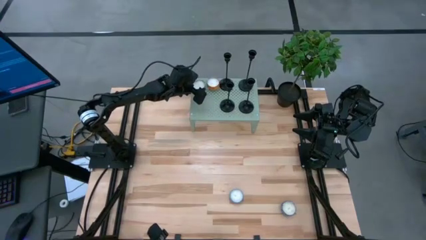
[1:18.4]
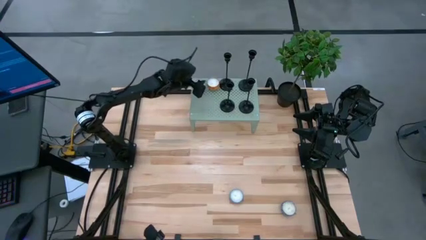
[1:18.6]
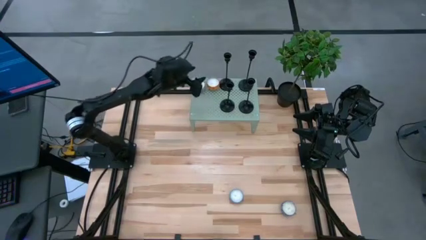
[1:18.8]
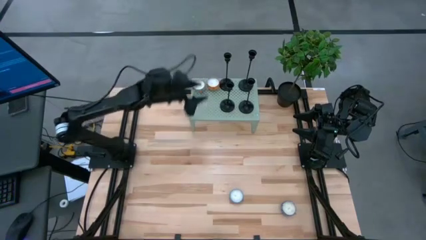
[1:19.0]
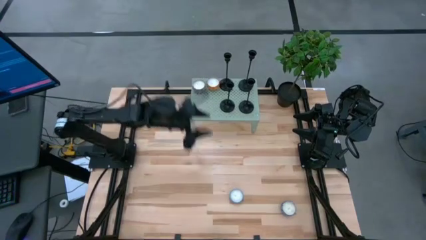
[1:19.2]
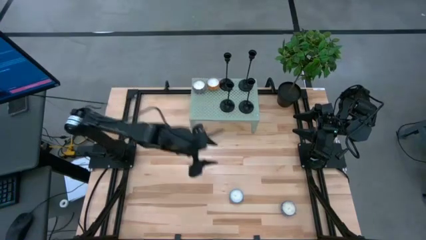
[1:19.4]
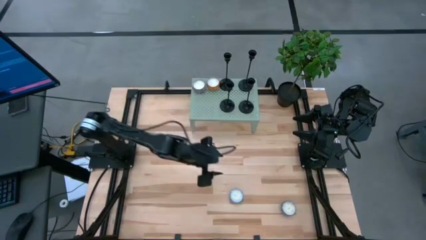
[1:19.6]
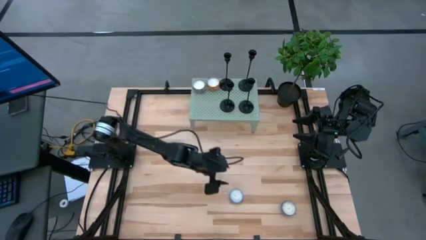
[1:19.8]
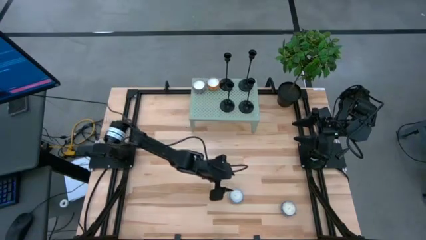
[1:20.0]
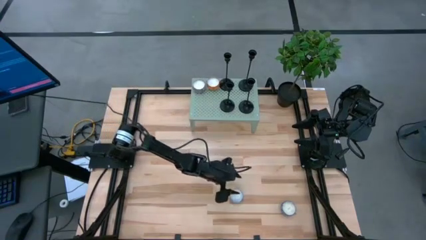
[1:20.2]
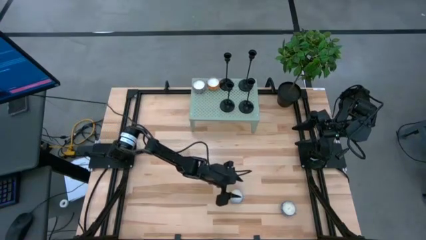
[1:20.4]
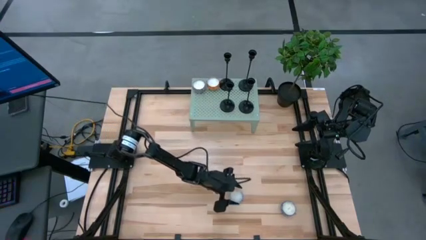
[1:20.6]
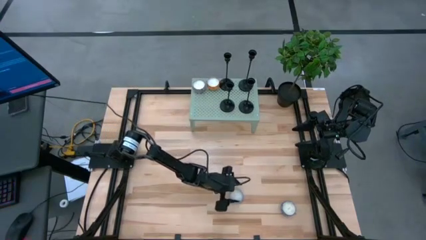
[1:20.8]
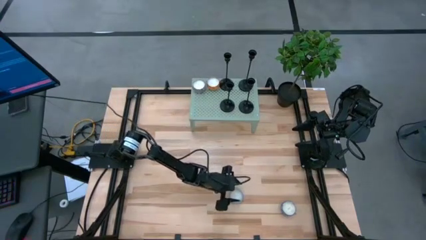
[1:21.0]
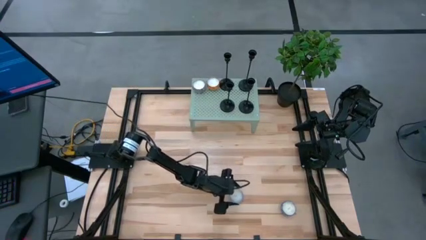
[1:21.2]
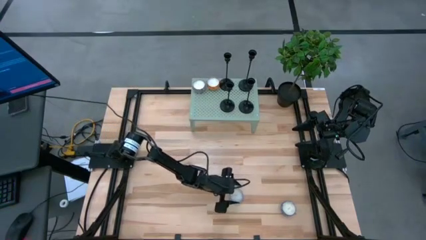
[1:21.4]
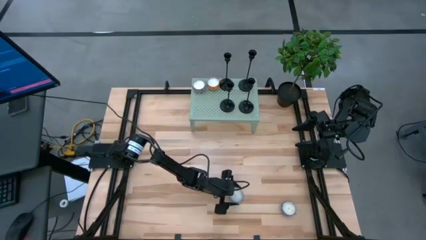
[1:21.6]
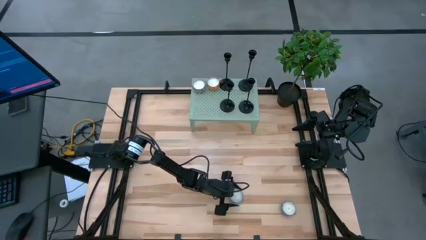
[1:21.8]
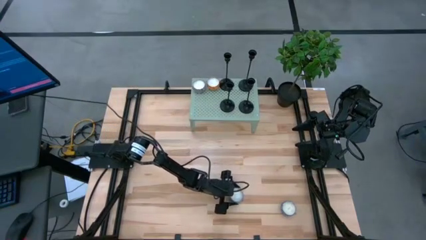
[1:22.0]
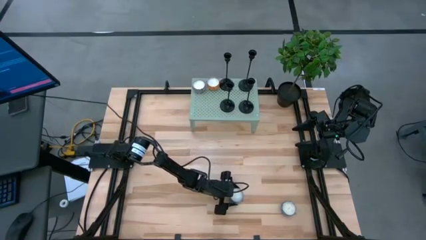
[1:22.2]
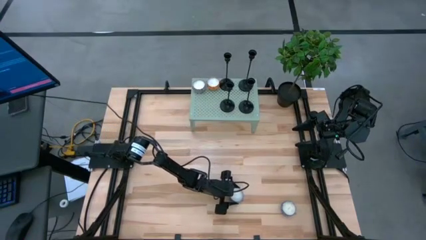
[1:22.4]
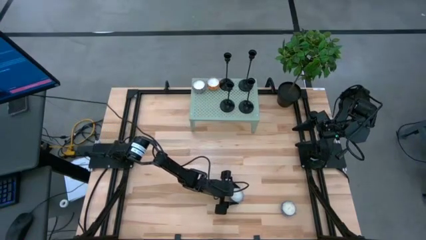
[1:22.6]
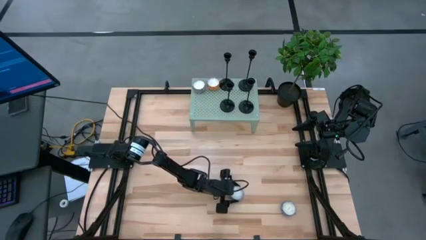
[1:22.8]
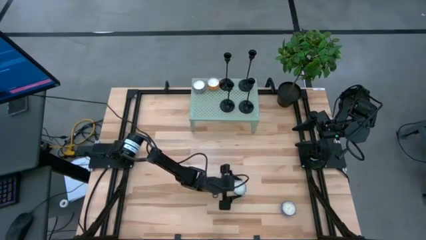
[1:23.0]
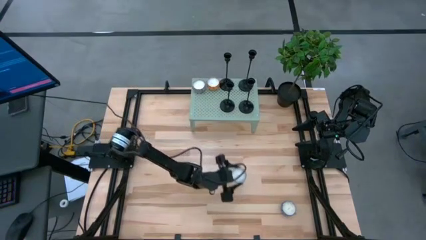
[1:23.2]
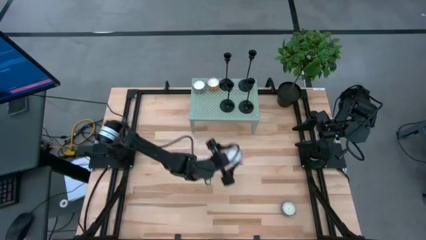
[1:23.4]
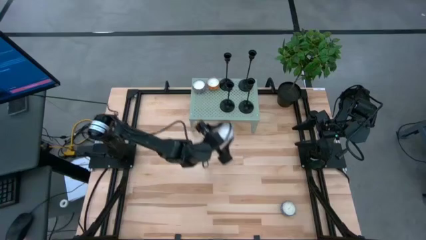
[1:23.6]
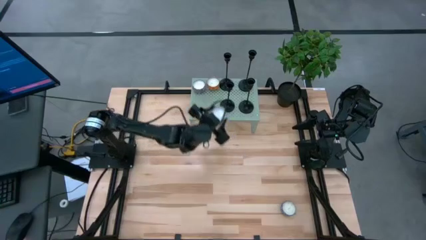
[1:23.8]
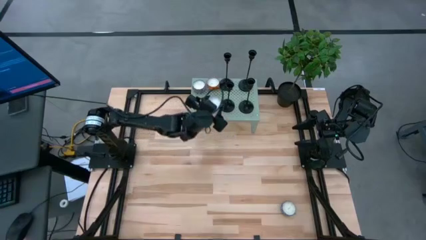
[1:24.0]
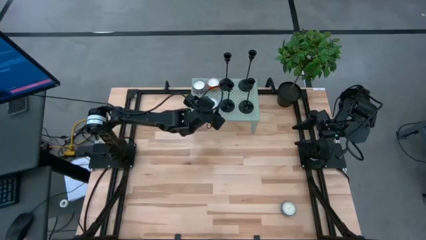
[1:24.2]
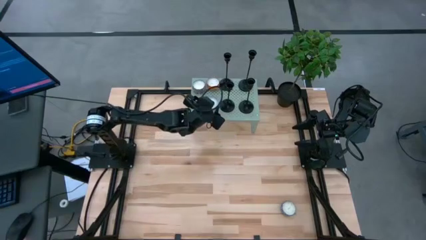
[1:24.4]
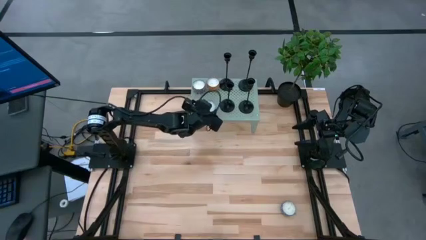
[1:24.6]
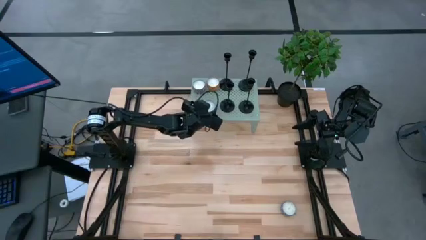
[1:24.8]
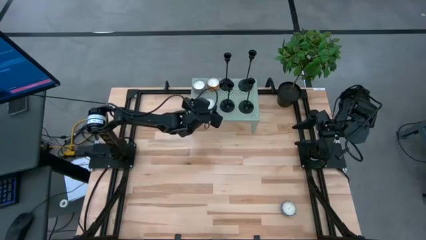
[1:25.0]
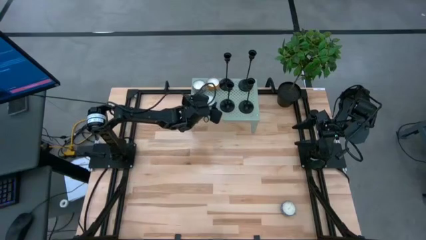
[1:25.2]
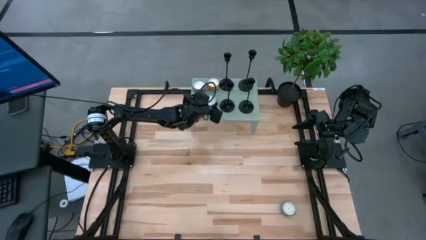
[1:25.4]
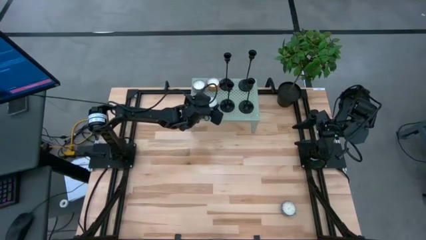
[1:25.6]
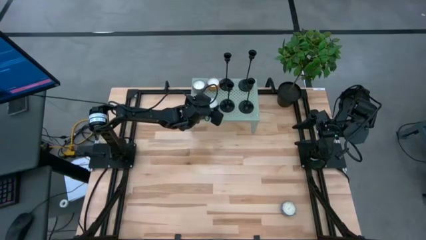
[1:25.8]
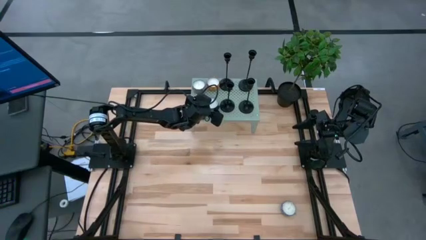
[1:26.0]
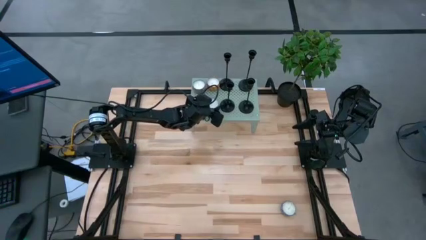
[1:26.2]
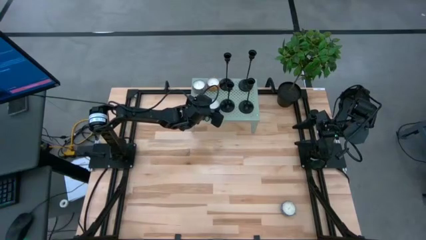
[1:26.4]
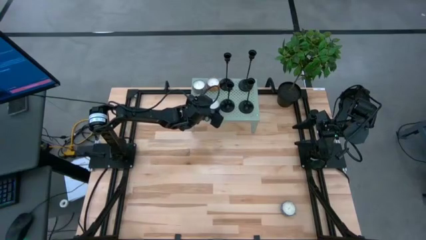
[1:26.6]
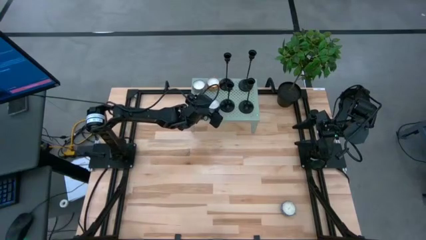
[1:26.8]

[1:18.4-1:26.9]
Task: Pick & Place candle stick holders
Put the light blue scented candle on the shelf

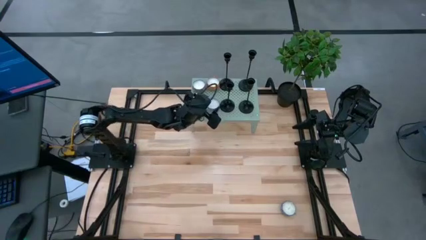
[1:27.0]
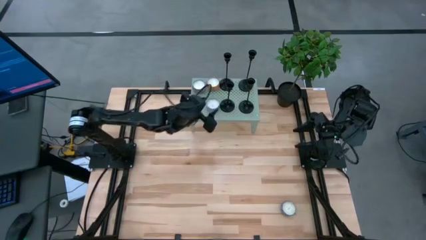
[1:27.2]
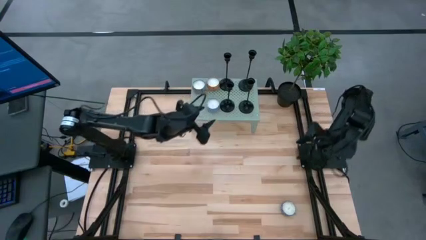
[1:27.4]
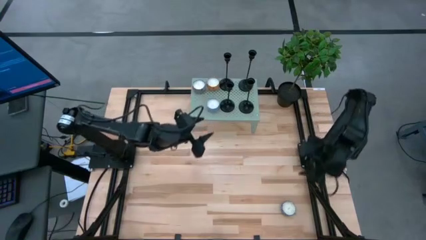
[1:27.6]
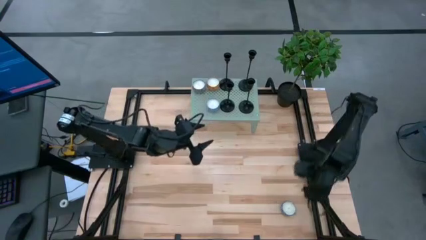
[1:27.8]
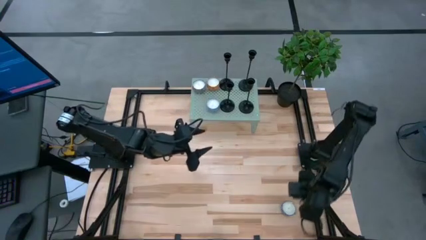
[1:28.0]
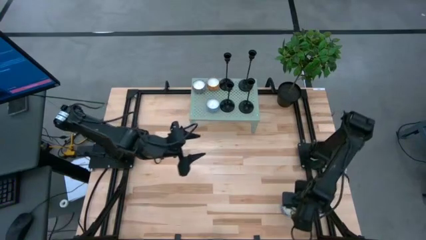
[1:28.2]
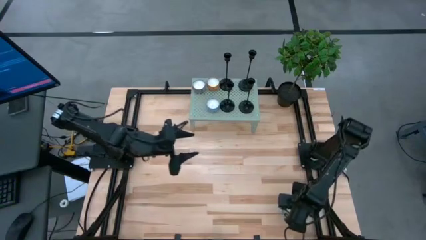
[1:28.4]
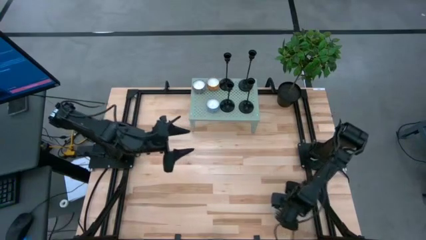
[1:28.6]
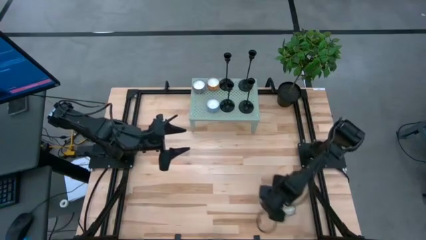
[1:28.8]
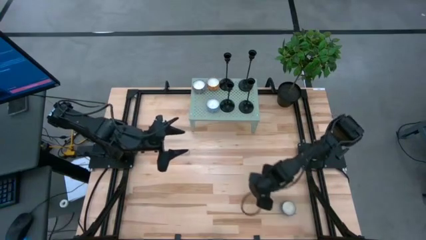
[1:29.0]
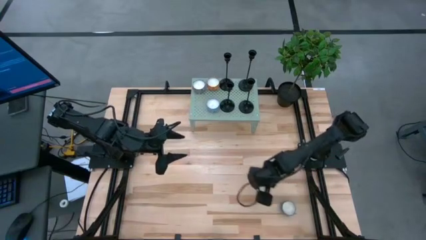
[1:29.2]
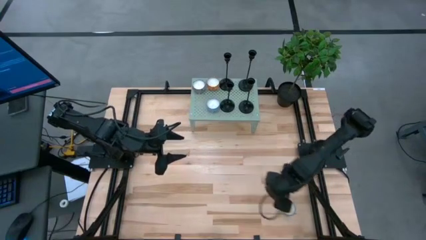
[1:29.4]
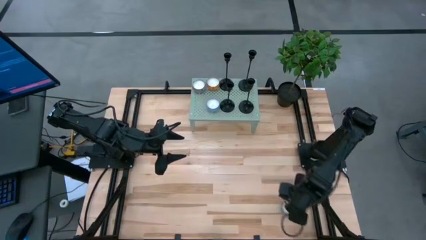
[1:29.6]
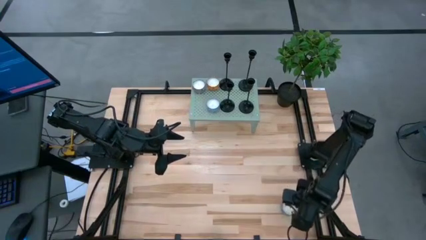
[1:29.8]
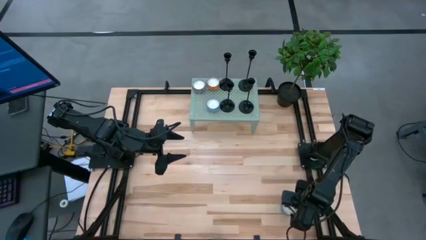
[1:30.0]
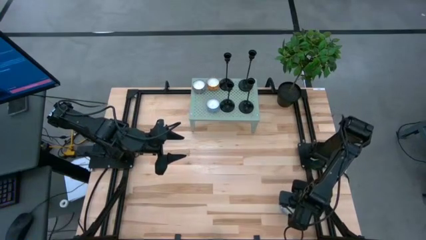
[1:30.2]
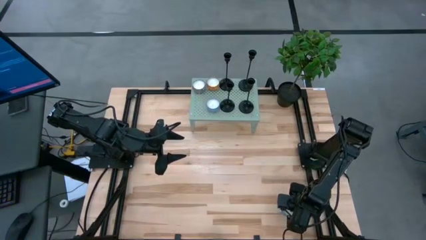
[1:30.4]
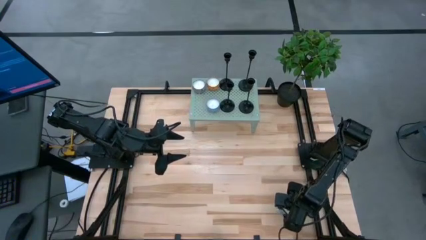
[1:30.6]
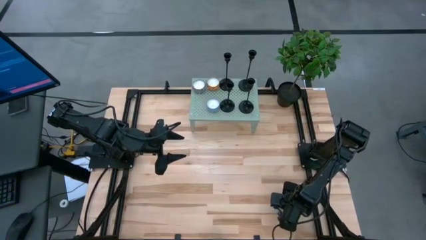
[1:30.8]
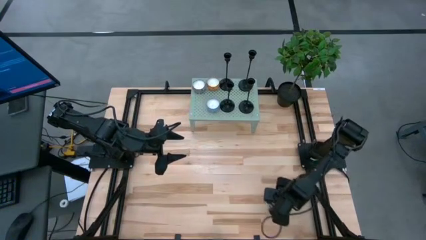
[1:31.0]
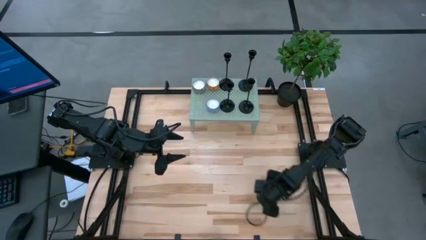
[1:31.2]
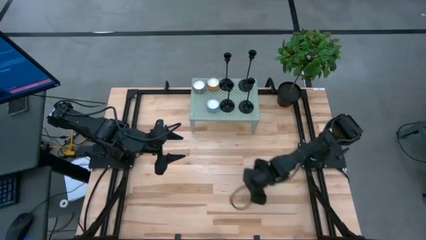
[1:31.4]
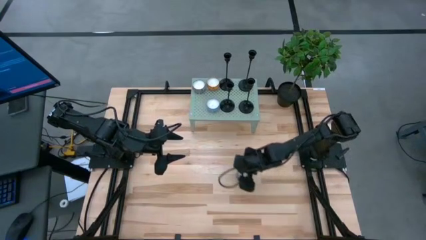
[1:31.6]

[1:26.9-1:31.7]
Put the blue scented candle on the shelf

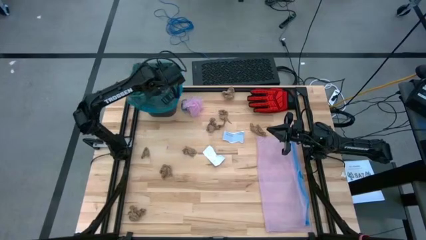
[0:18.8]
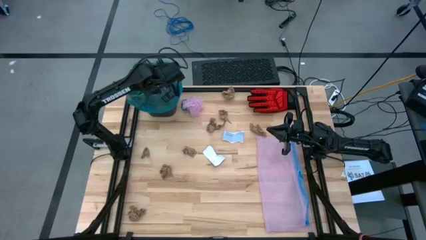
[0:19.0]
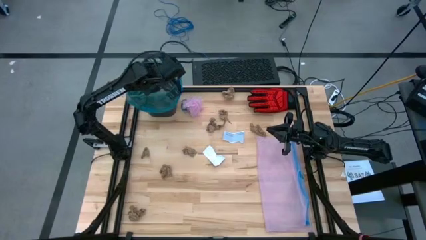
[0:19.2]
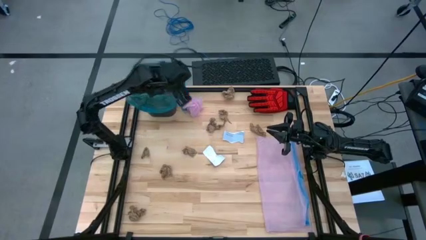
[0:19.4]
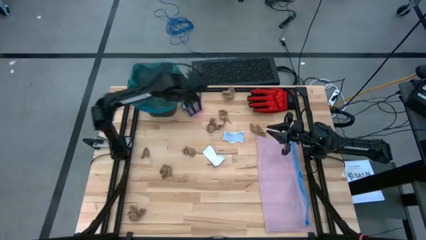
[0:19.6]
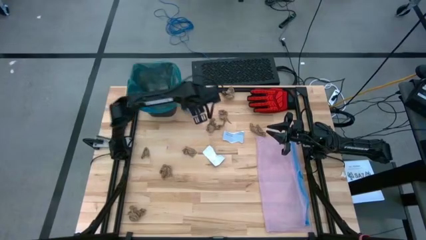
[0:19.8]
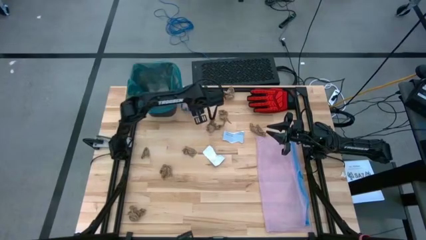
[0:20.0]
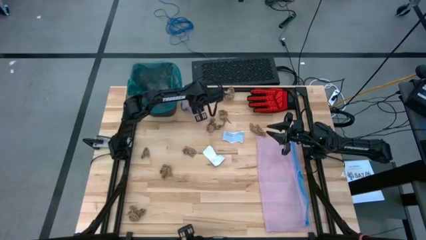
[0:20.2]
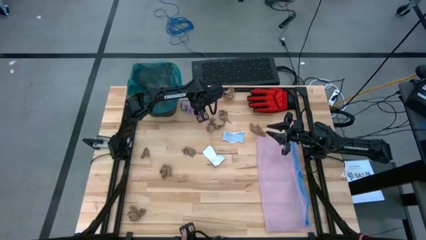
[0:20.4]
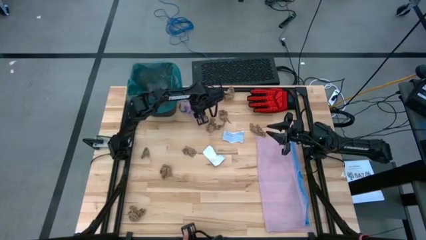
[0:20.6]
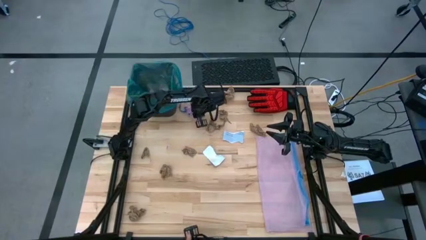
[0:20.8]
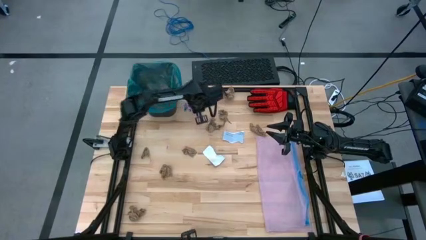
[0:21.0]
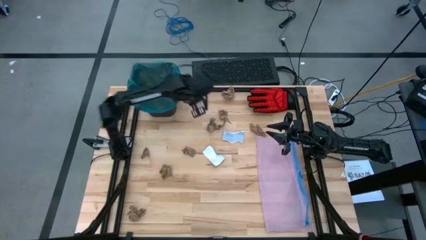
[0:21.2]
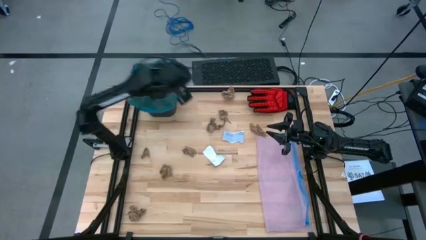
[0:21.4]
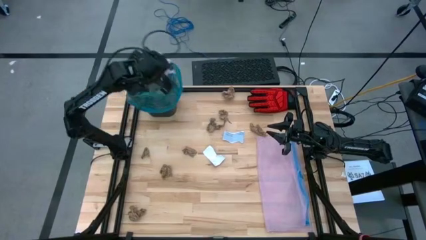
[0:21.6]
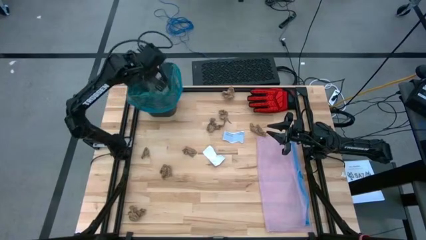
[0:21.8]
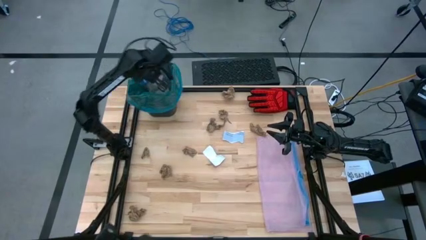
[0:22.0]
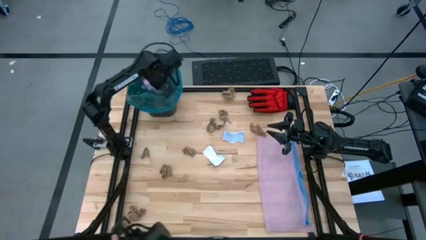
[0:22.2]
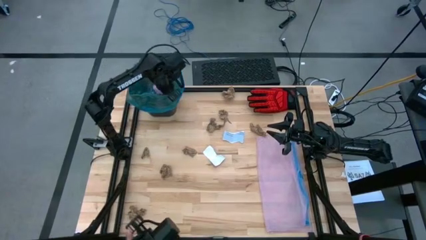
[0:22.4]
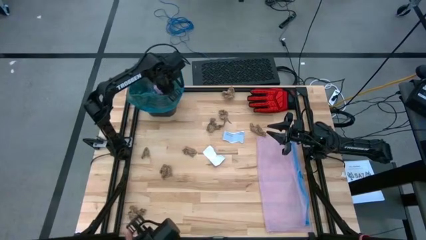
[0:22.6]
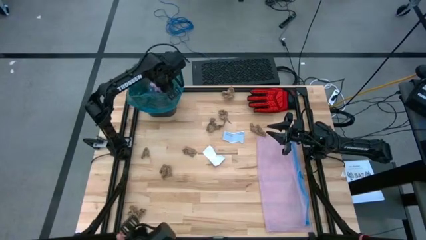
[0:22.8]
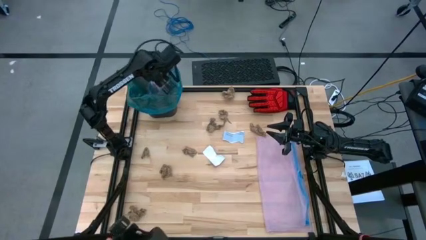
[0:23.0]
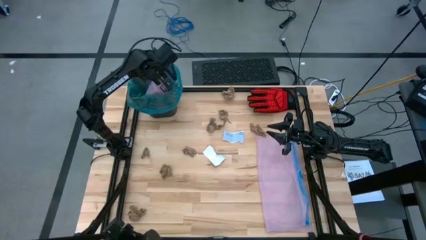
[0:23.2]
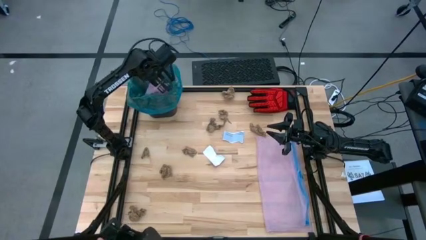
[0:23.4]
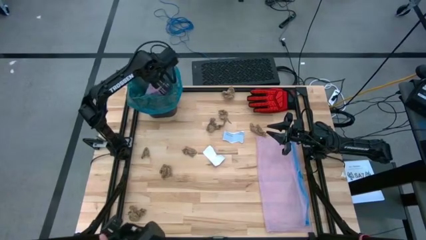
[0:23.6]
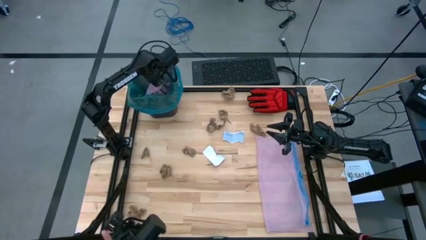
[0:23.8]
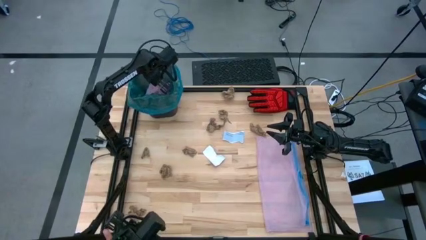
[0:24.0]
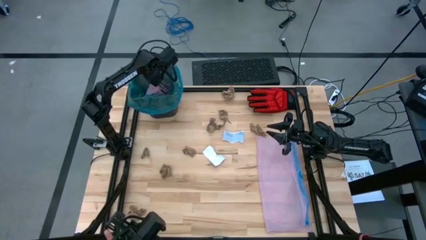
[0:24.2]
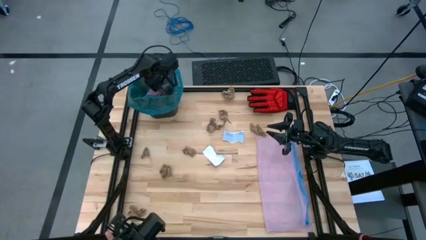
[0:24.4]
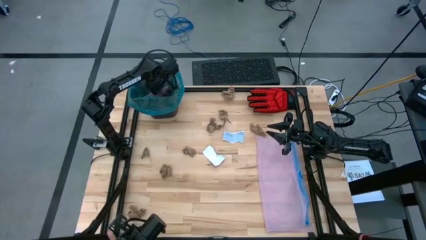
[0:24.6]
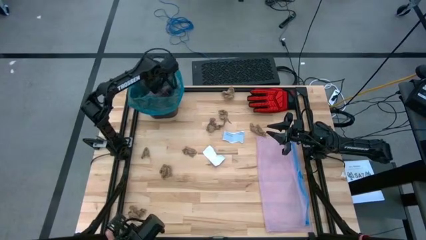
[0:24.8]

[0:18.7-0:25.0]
Task: place trash/remove bag and relplace
Put the crumpled pink trash bag into the trash bin
